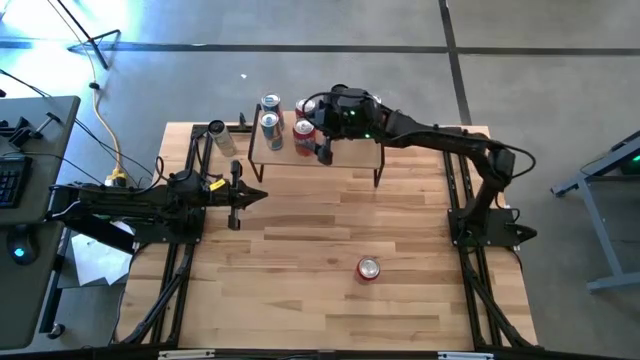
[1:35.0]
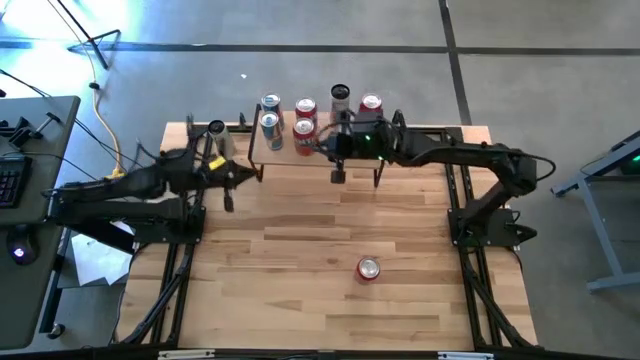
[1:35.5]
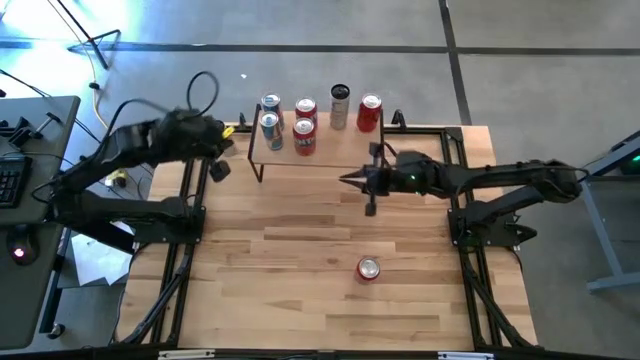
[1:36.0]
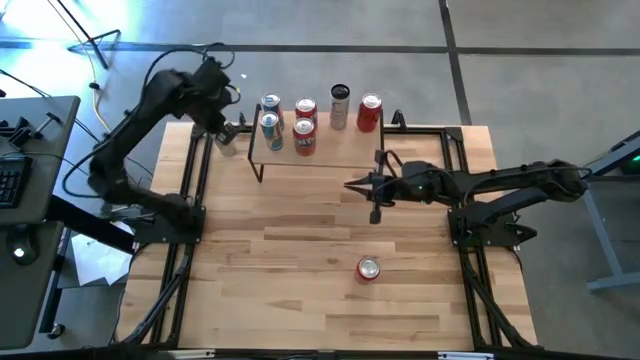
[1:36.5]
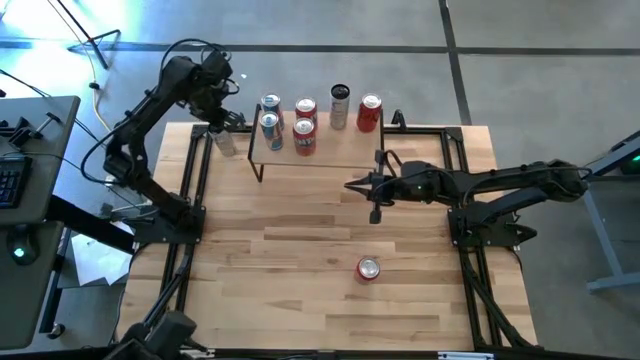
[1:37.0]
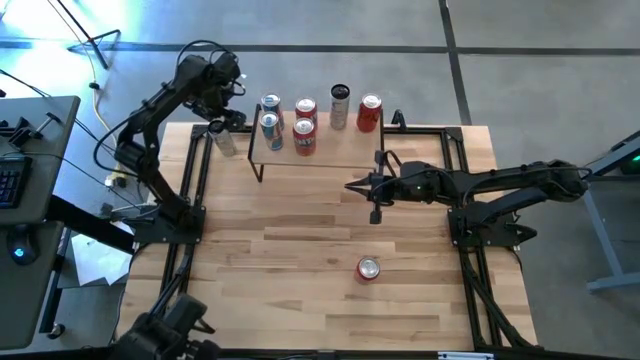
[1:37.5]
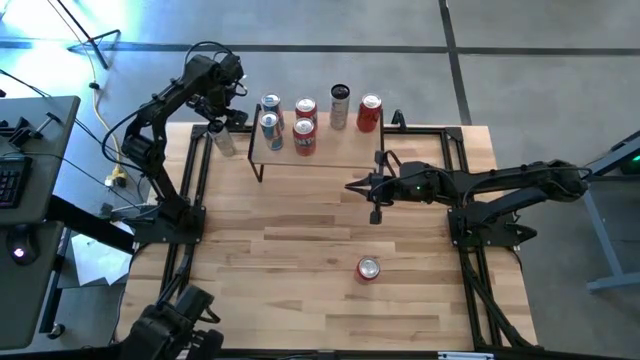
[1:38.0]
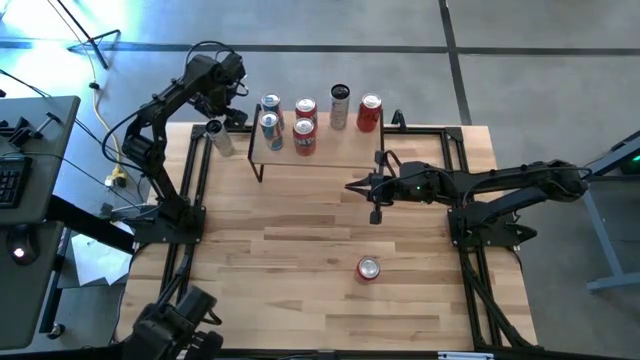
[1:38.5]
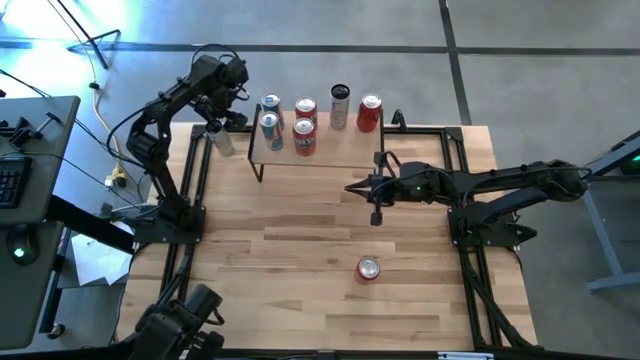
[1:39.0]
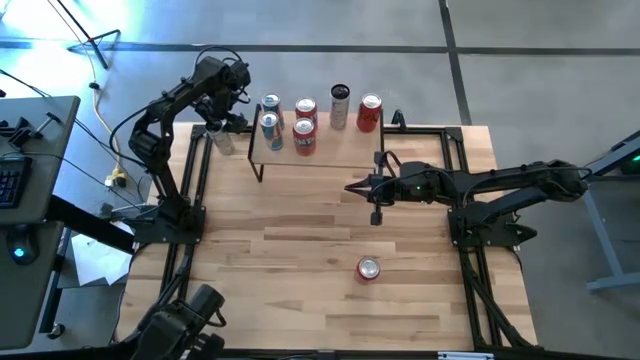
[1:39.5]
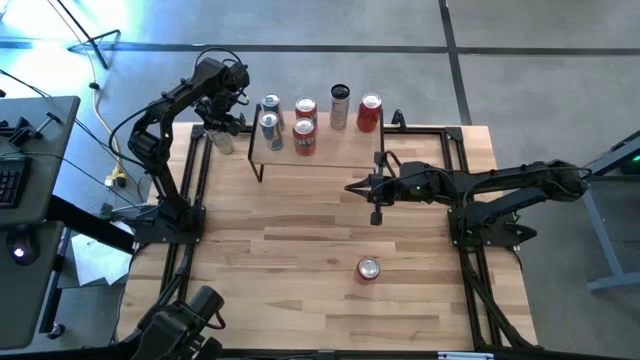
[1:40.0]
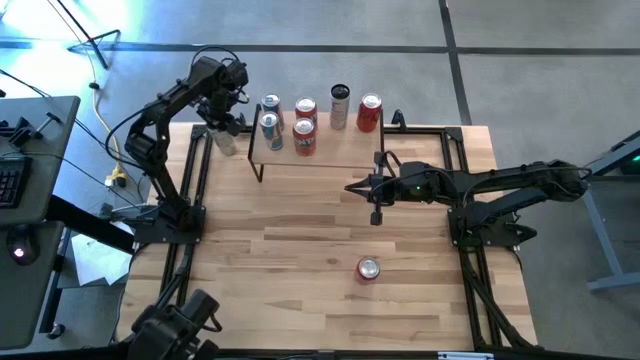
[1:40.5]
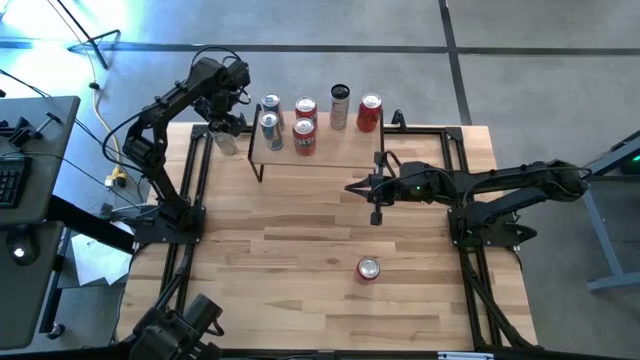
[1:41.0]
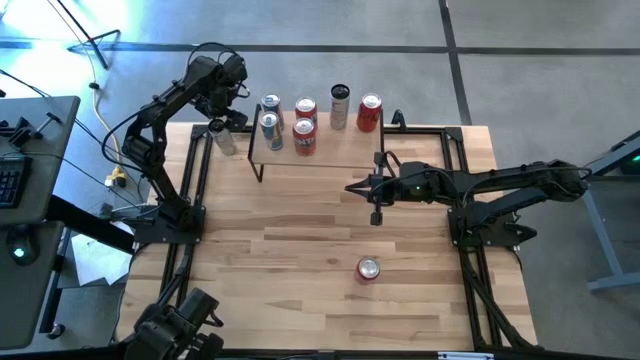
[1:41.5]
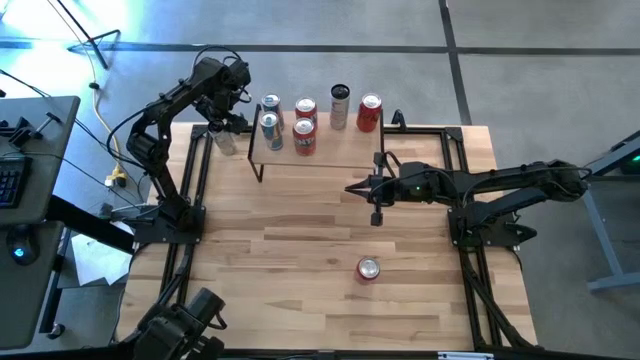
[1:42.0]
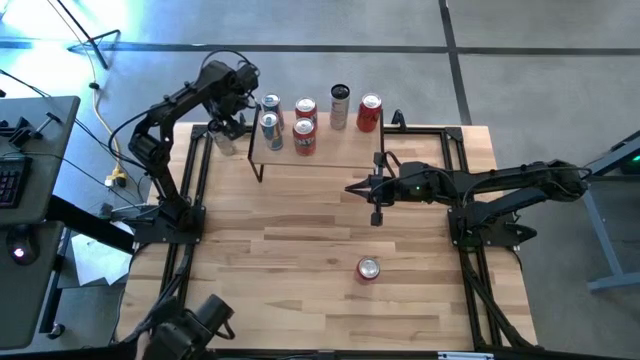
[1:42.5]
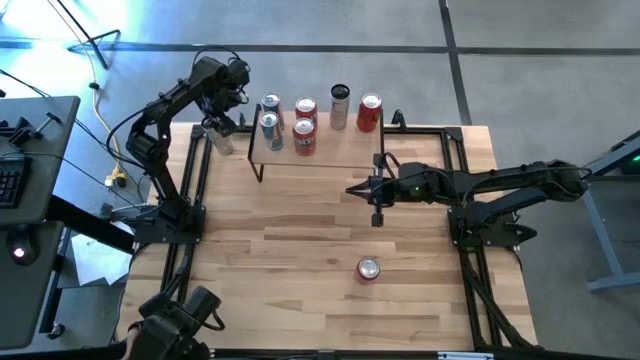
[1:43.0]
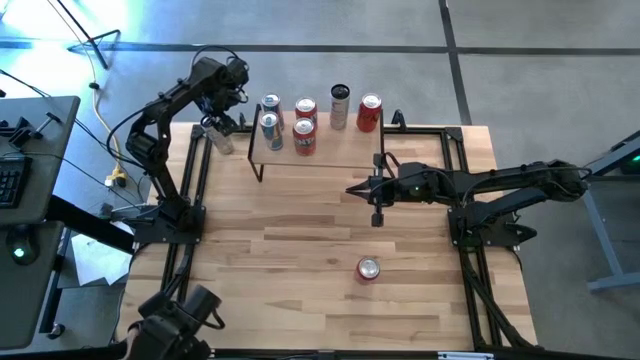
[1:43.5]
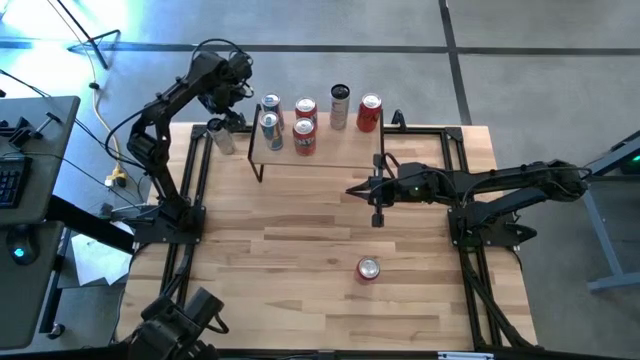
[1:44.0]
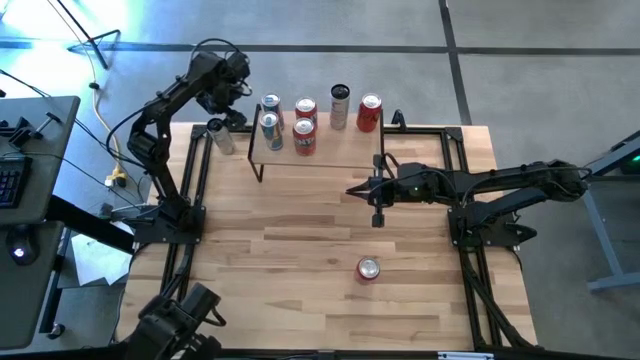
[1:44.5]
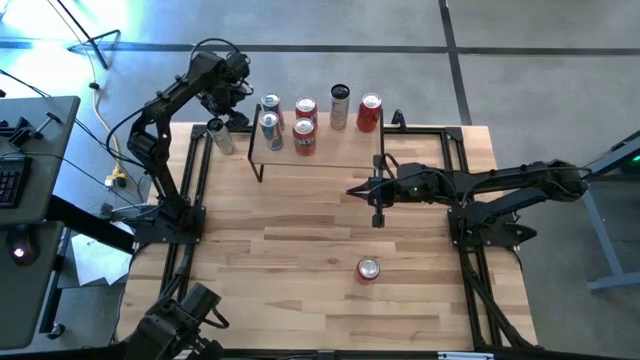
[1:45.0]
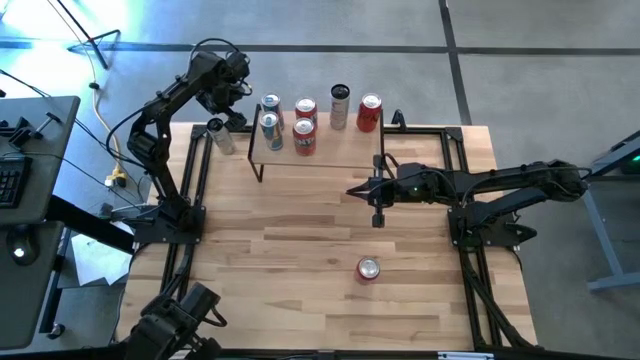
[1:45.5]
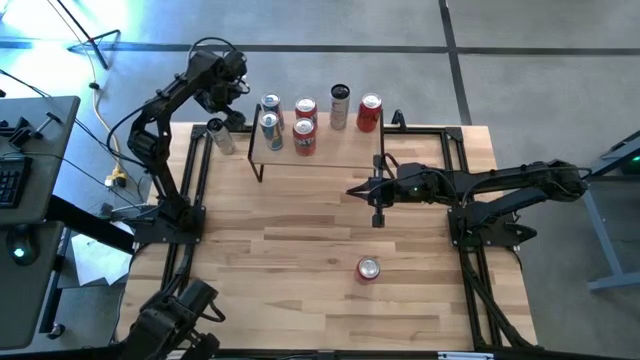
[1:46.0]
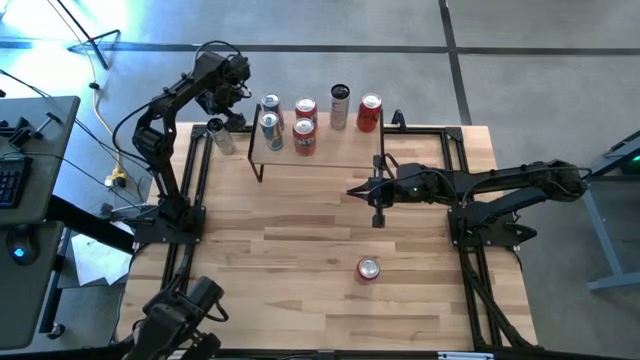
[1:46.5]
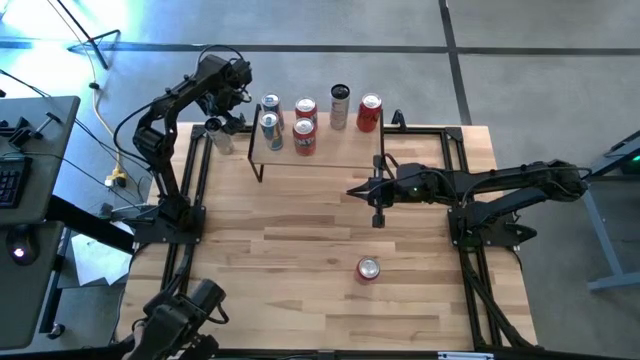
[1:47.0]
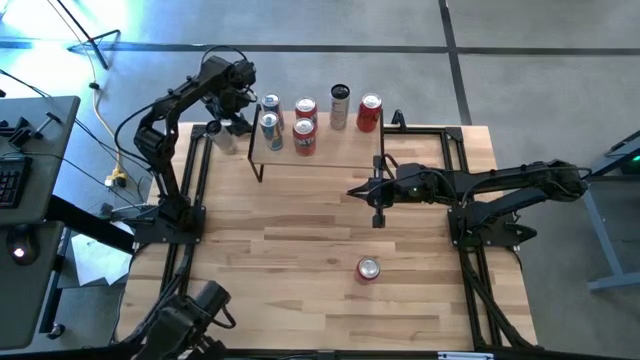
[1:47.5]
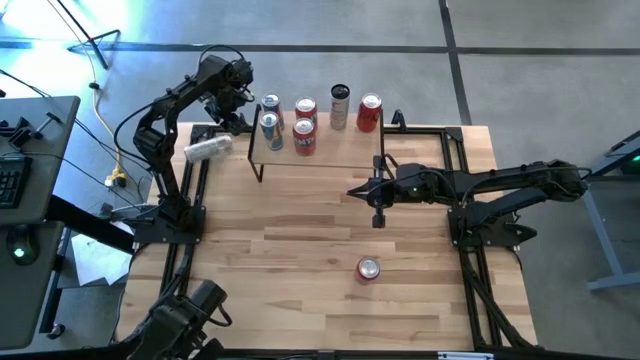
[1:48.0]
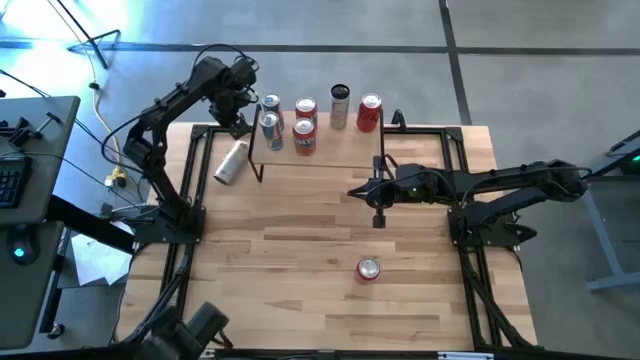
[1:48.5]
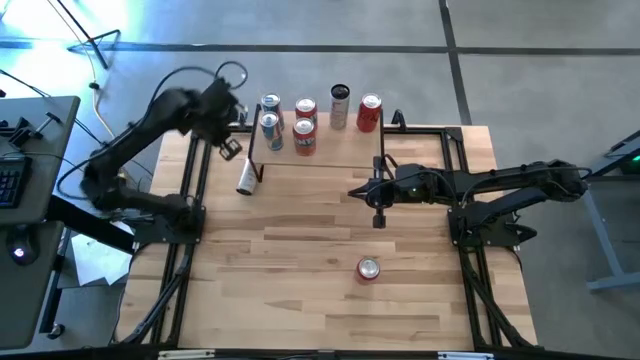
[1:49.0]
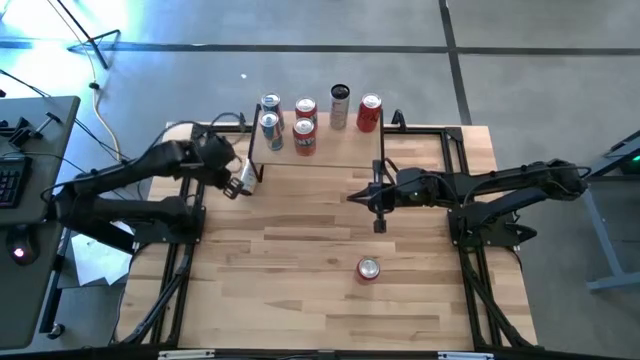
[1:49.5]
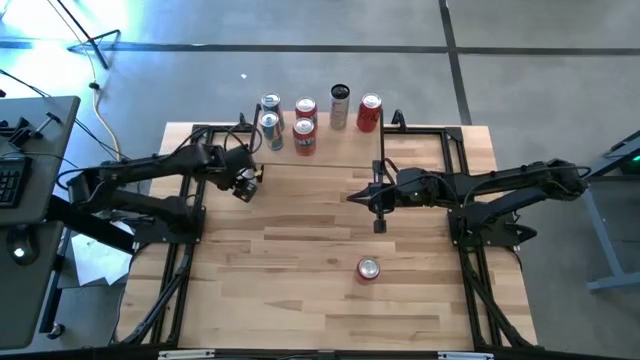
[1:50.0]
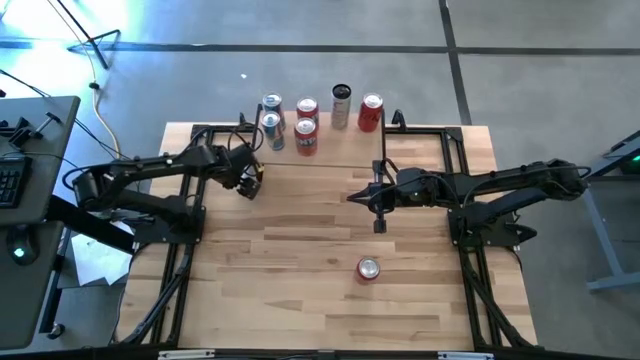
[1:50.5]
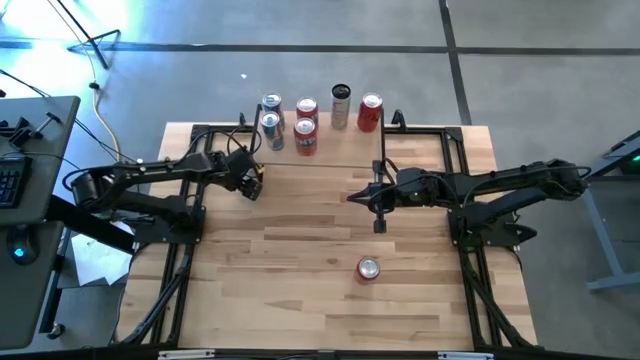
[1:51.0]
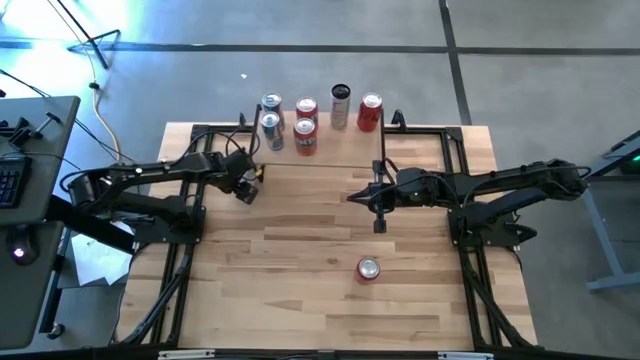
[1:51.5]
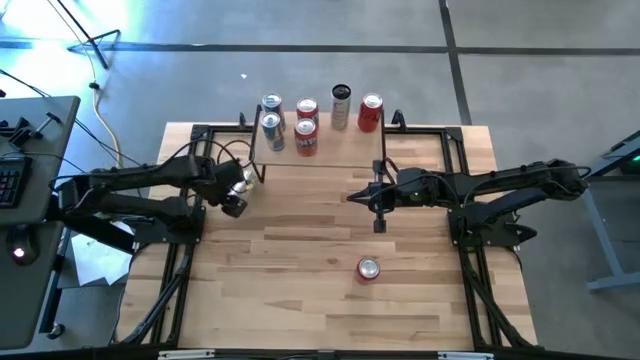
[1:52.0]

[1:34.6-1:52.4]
Task: Place canned beverage on shelf
Put the white and yellow soda can on the shelf aligned with the other white and yellow soda can

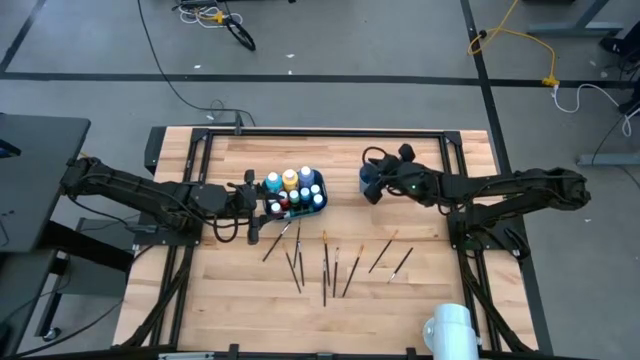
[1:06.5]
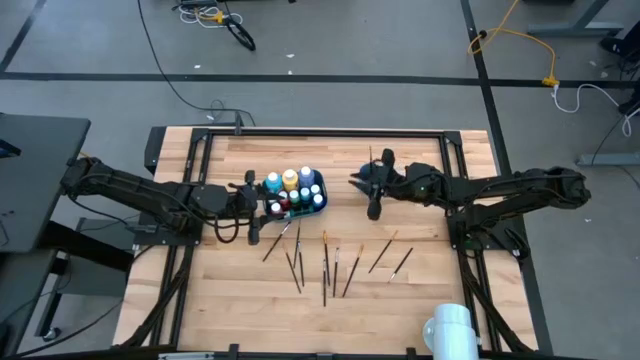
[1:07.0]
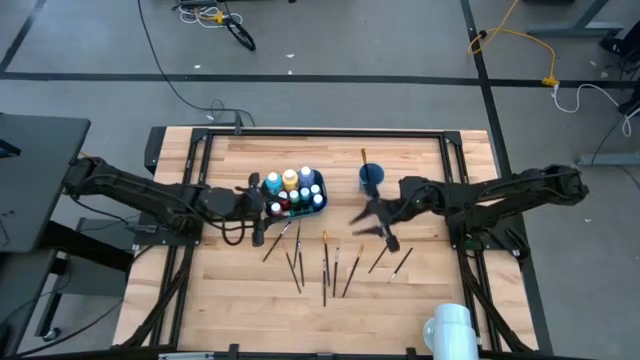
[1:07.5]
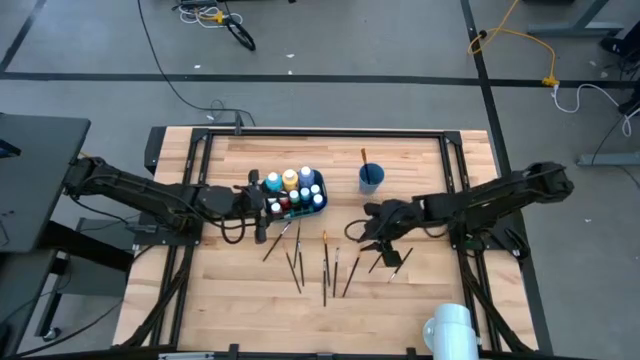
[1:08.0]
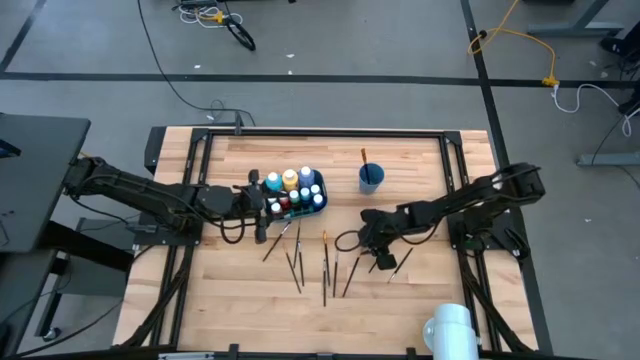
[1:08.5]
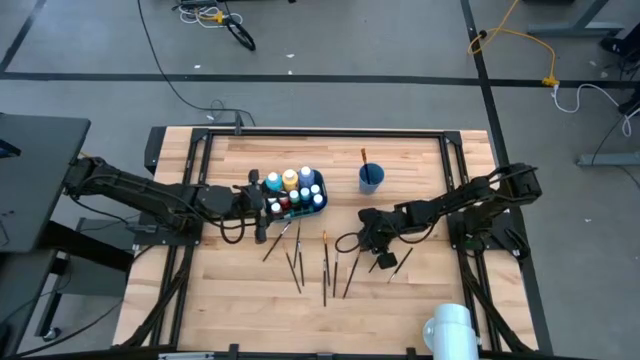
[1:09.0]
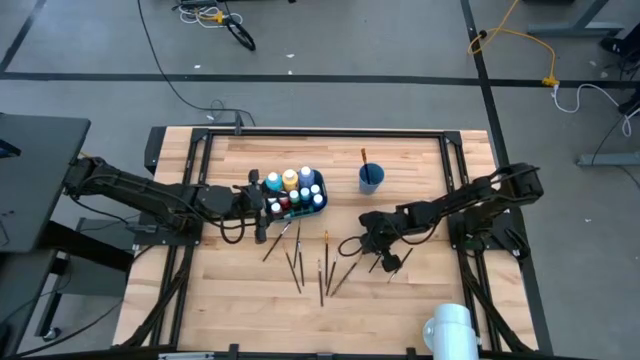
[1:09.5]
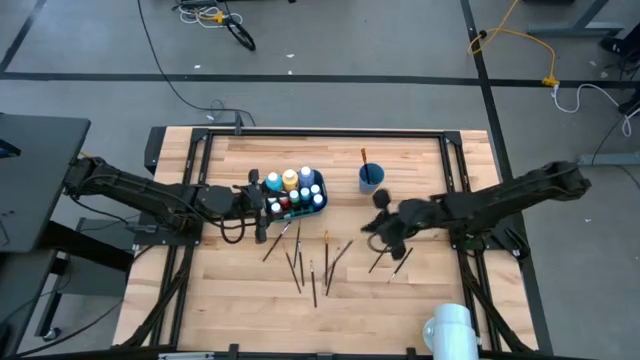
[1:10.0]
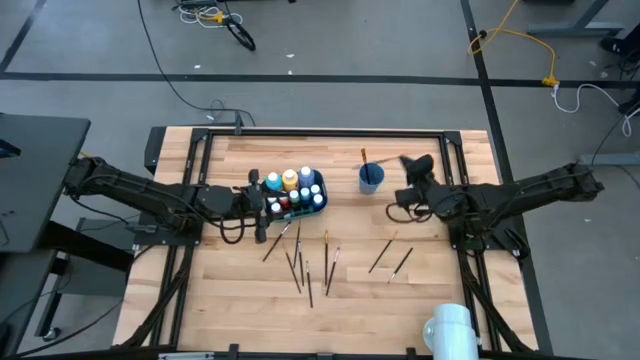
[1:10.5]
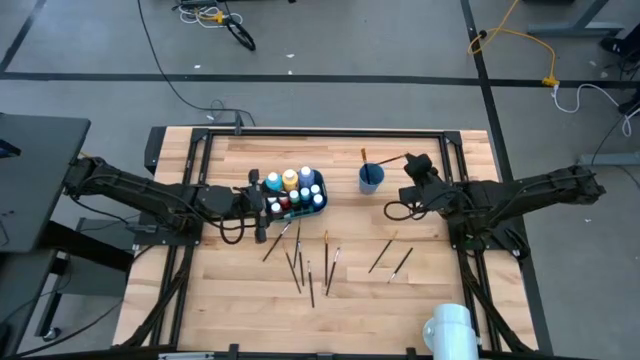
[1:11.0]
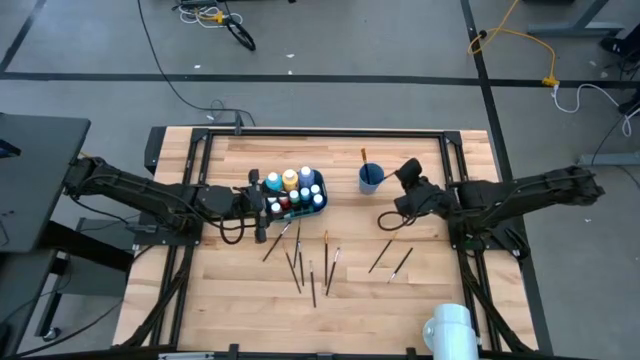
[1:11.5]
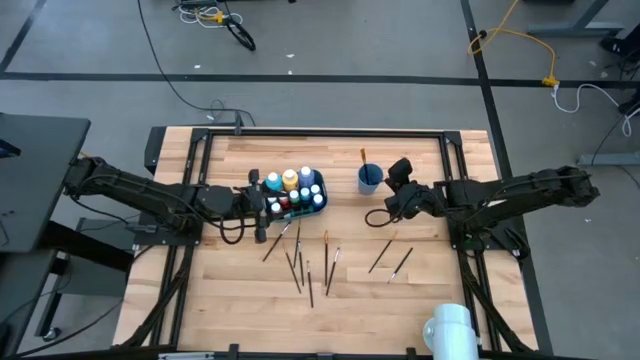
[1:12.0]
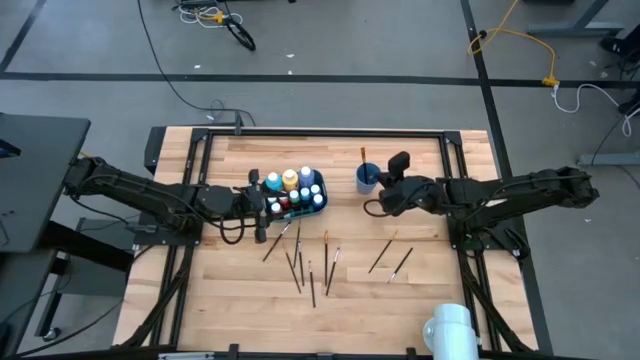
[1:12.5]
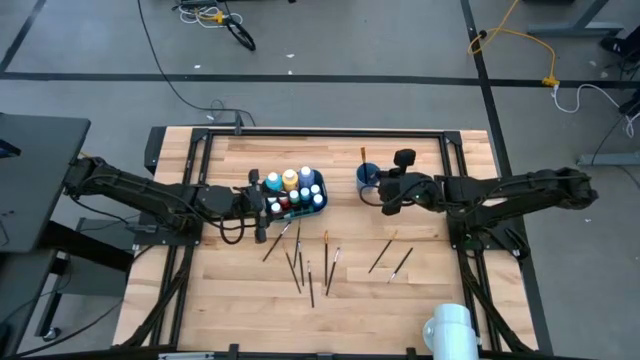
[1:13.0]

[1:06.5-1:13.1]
Task: Pick & Place Paint Supplies
Put the orange paint brush into the blue cup
